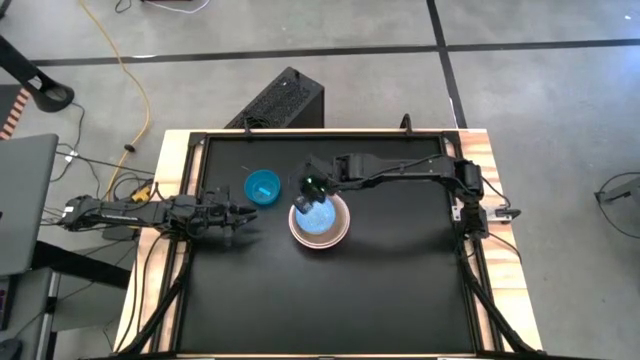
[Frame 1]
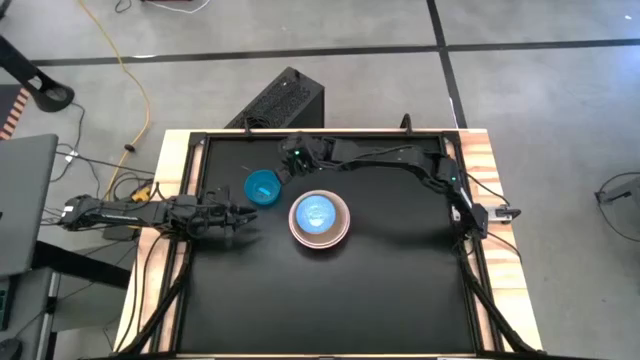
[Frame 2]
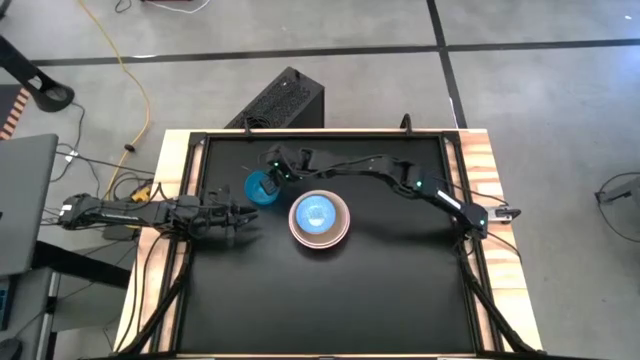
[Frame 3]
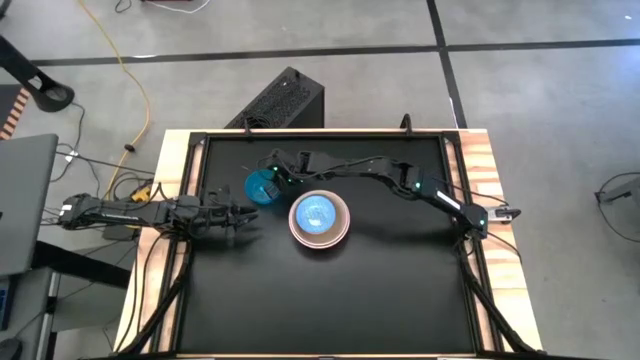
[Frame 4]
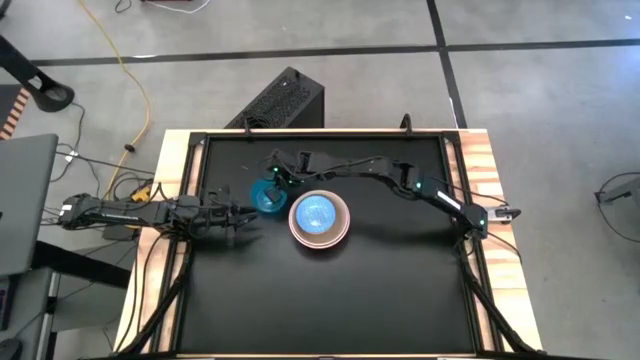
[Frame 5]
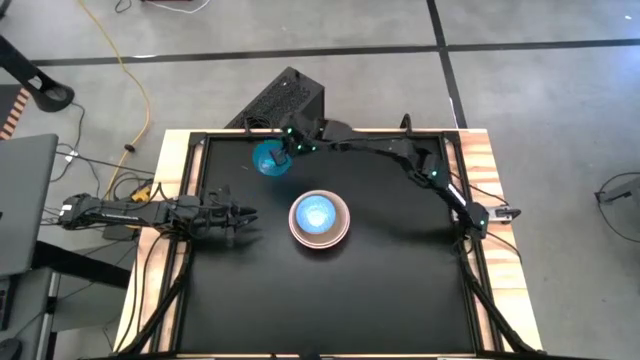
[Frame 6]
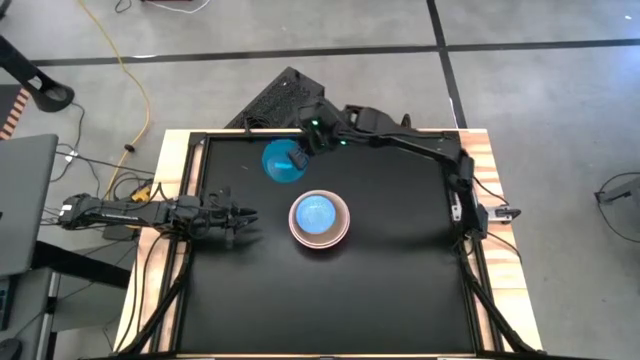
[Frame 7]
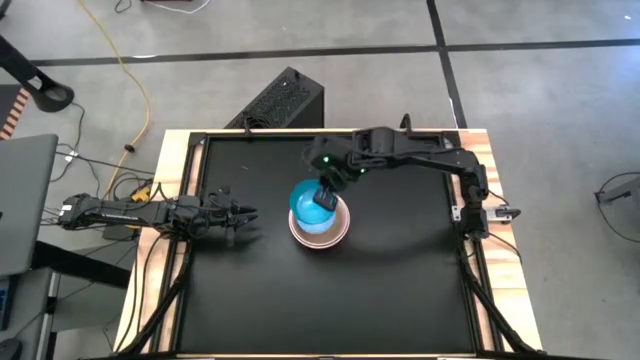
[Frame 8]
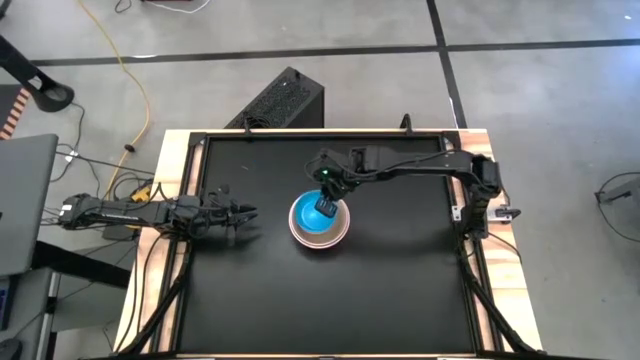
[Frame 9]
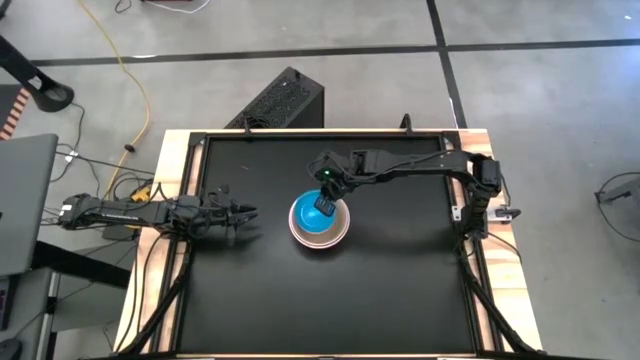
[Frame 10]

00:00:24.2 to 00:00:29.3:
Stack the blue bowl on top of the blue patterned bowl

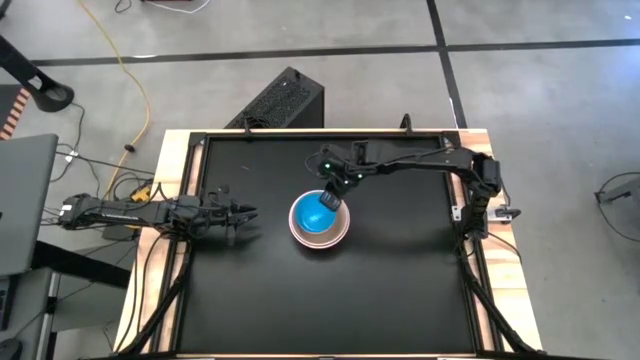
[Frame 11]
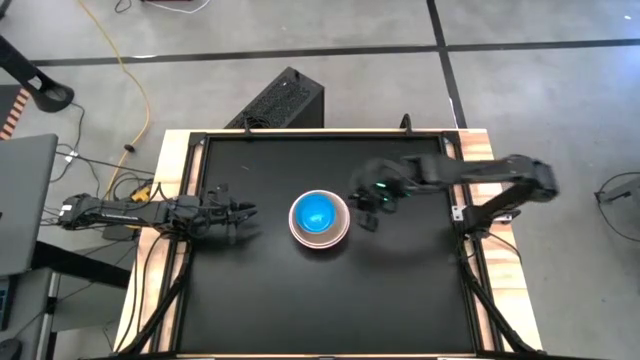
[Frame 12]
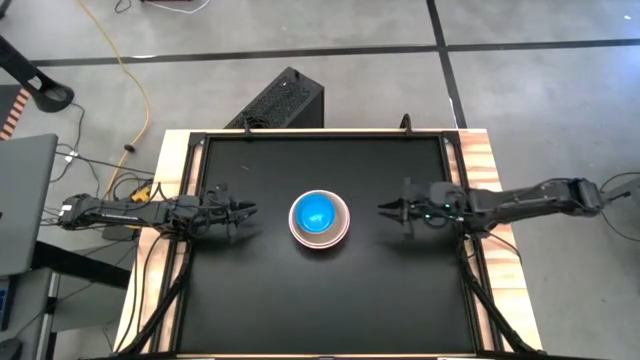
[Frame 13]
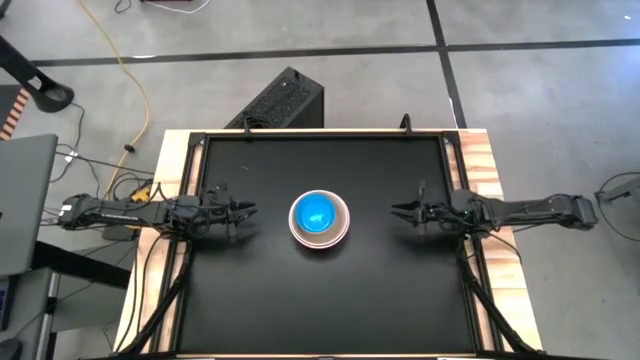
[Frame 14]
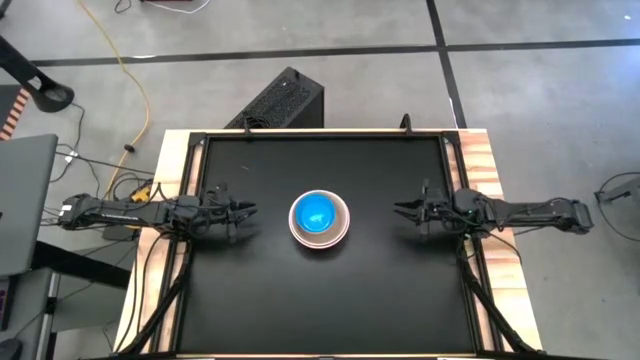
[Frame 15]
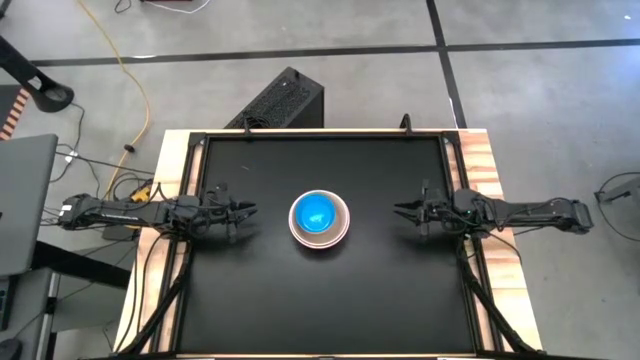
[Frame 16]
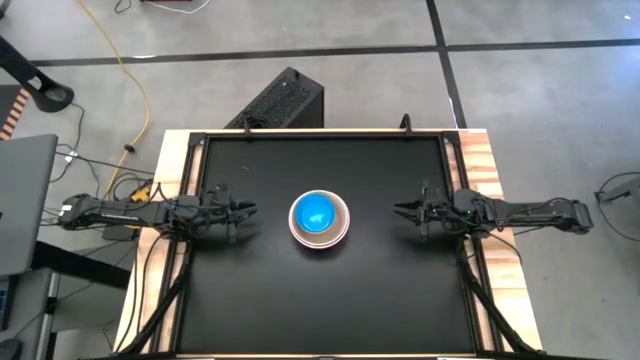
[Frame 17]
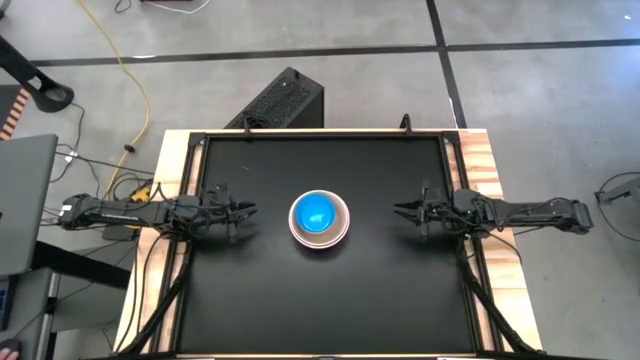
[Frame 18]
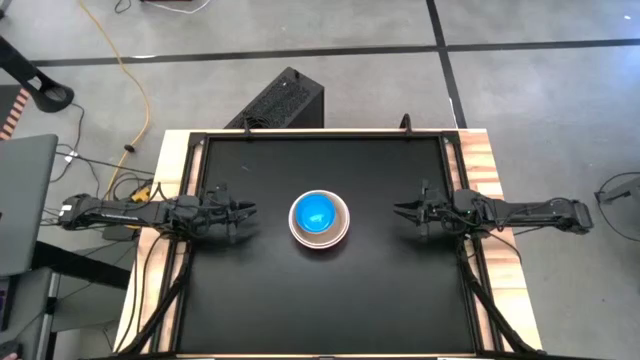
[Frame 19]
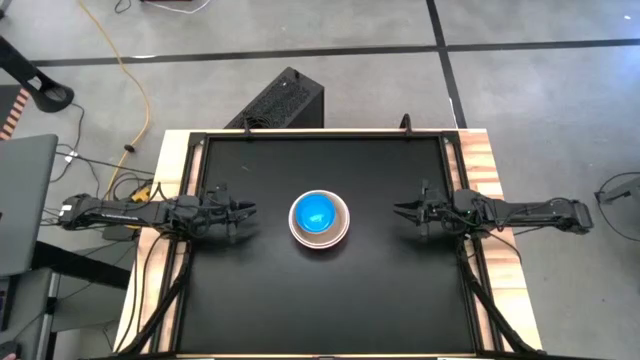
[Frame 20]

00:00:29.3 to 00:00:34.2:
Return to Home Position

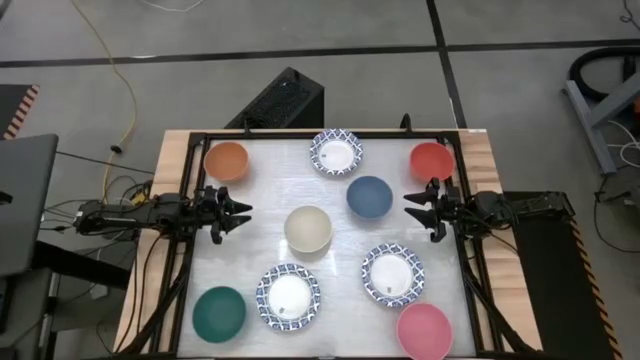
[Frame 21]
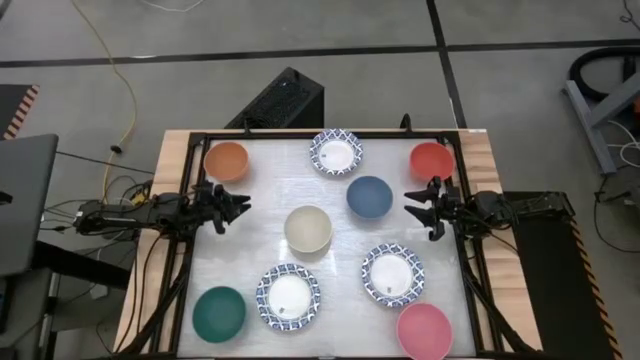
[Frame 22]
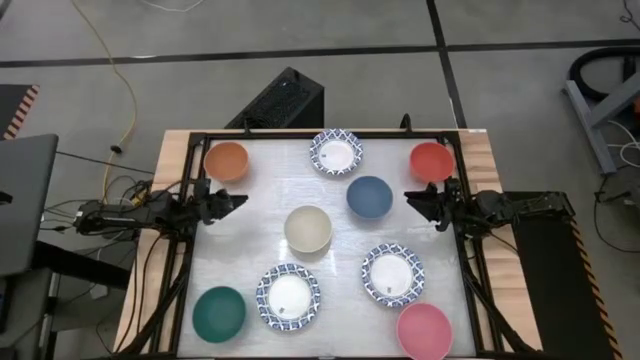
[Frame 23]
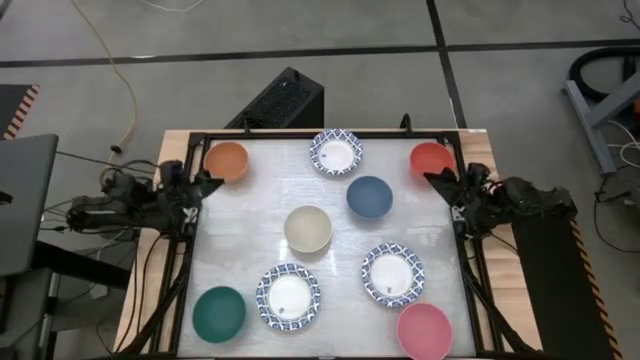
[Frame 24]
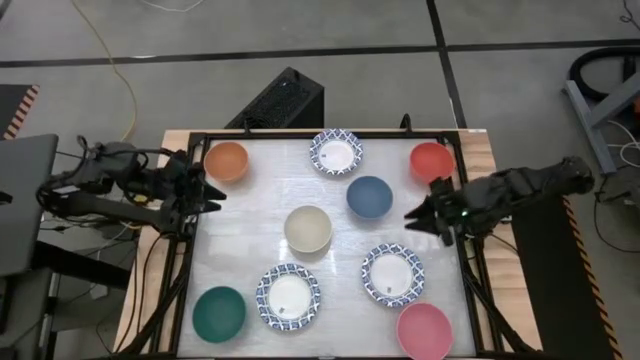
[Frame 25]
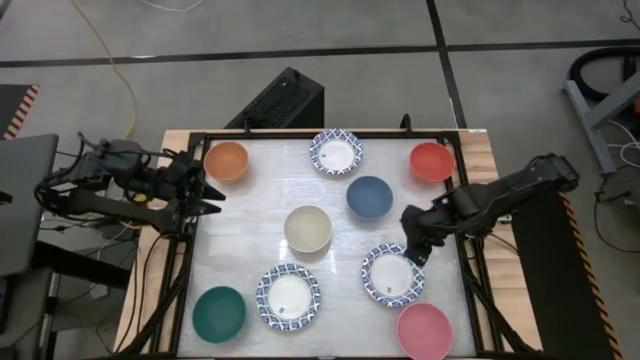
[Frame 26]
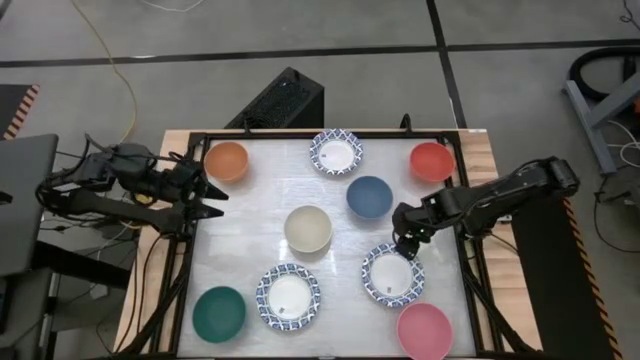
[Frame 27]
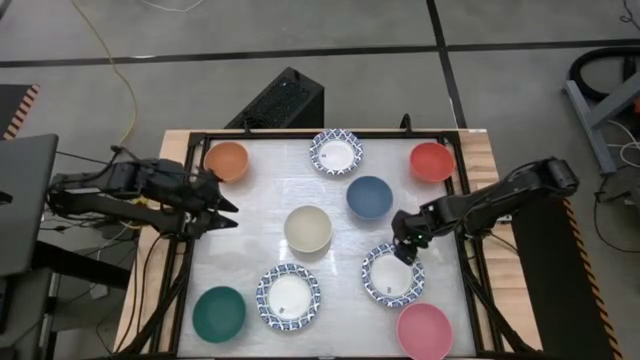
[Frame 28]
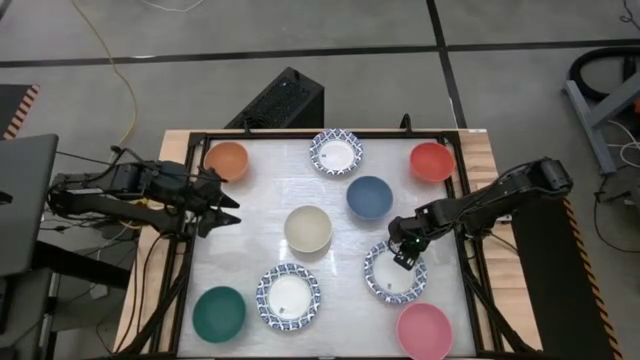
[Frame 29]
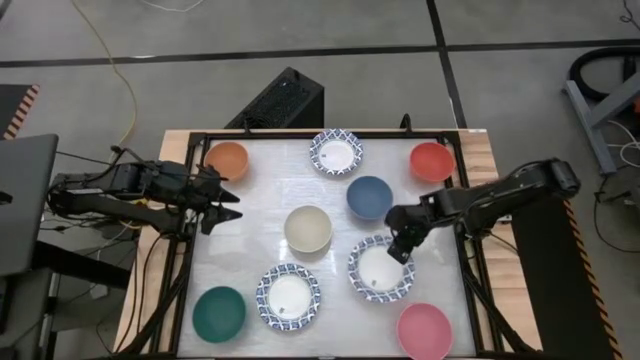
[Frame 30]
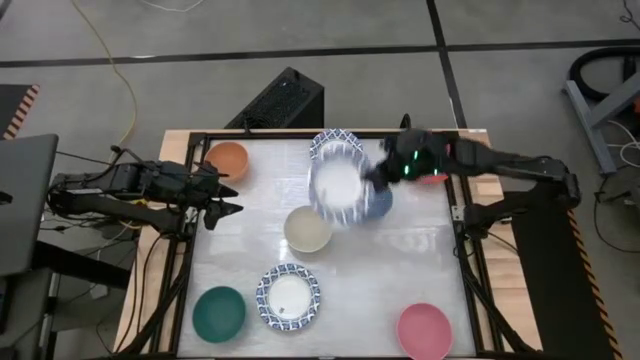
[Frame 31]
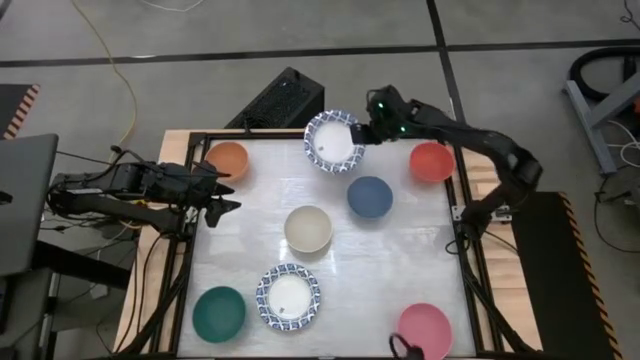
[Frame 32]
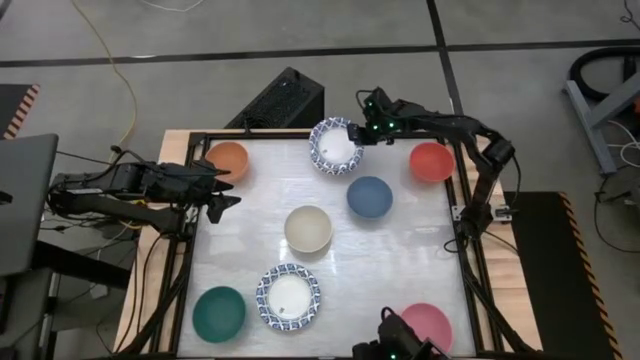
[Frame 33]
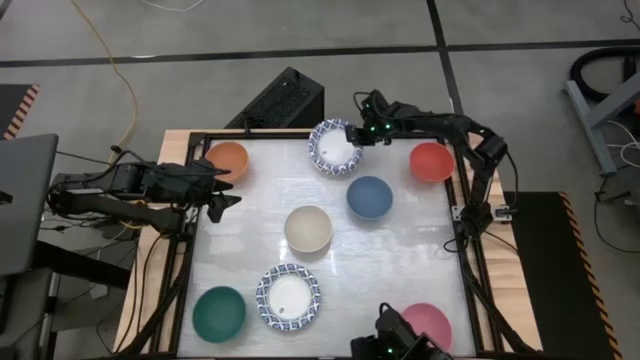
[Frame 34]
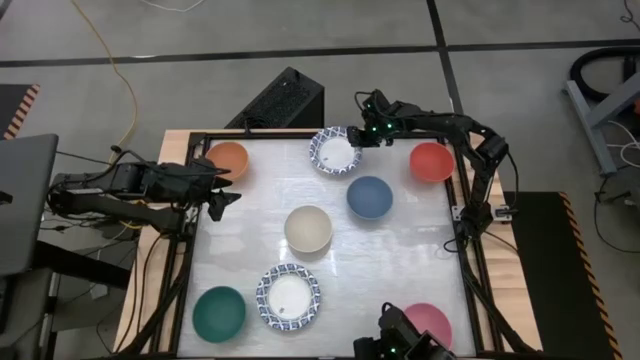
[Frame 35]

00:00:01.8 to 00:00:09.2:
Stack the right white and blue bowl on the top white and blue bowl

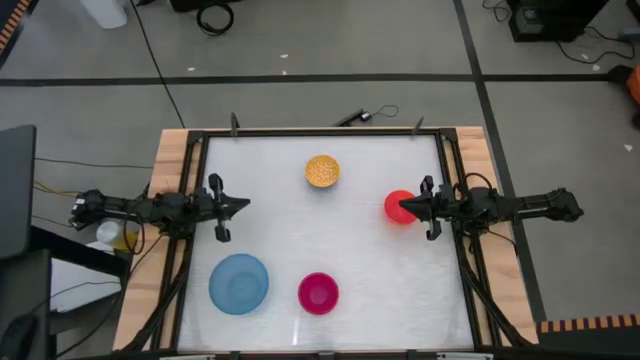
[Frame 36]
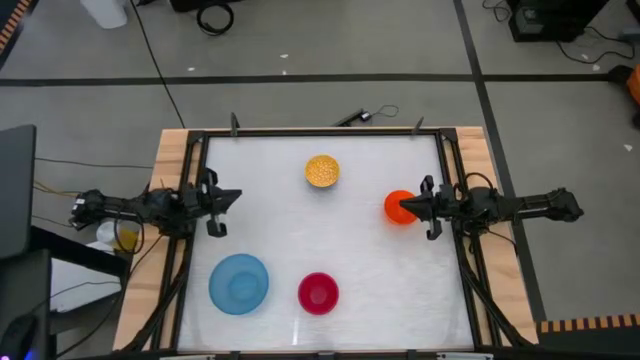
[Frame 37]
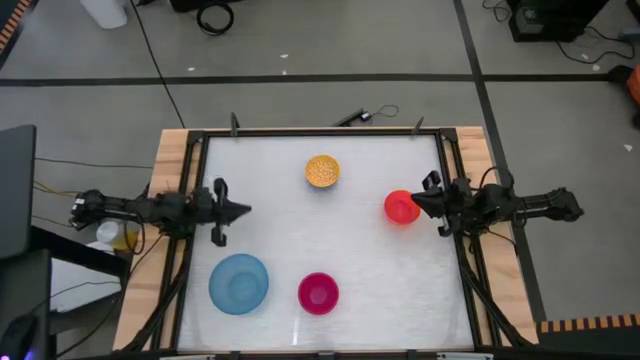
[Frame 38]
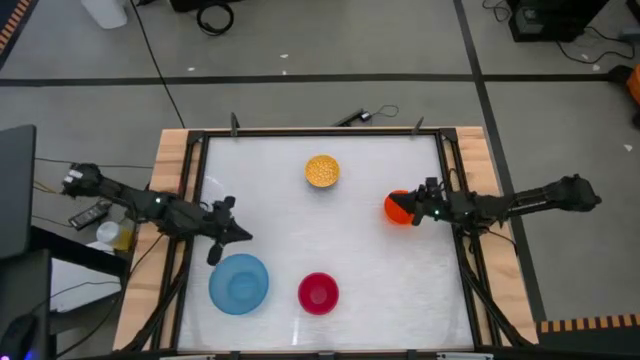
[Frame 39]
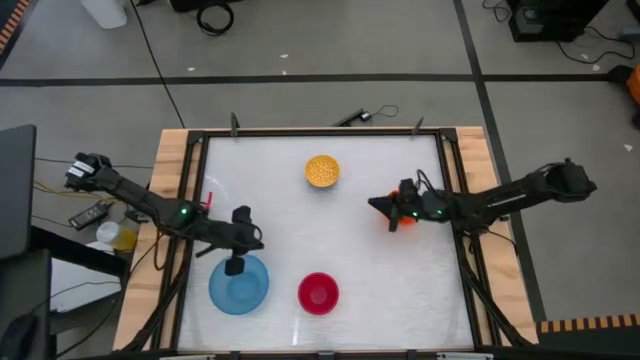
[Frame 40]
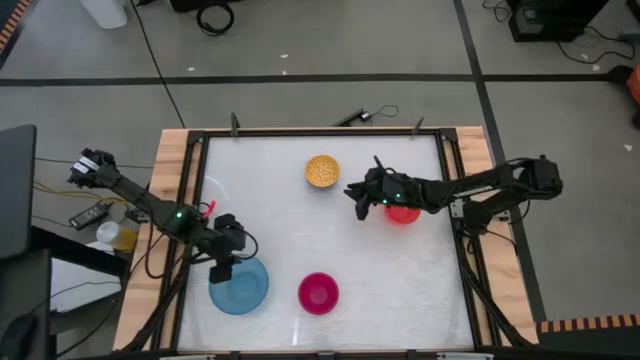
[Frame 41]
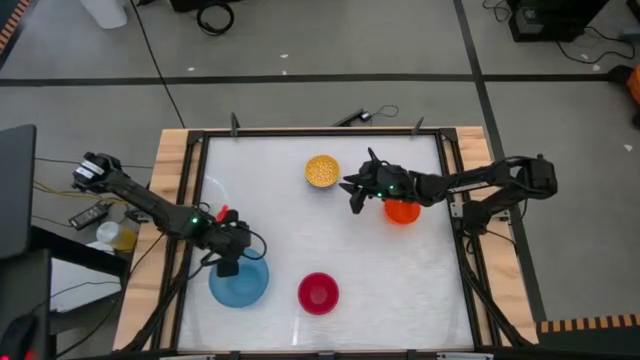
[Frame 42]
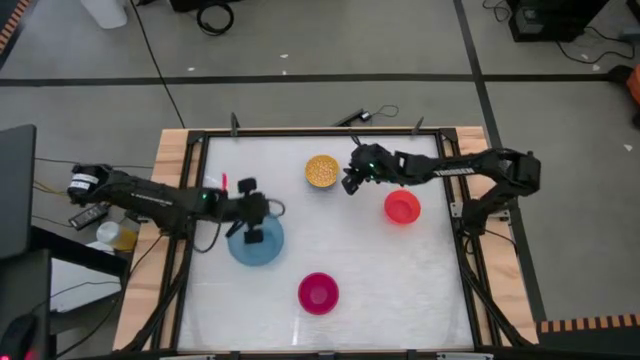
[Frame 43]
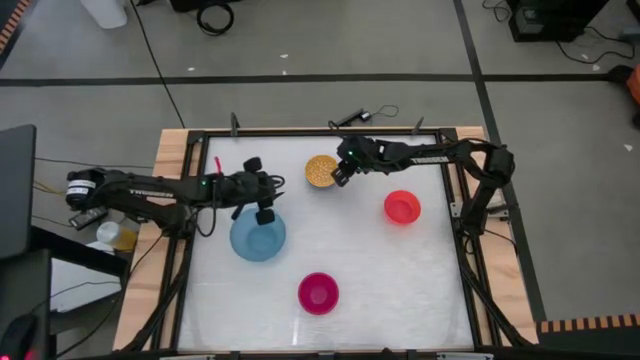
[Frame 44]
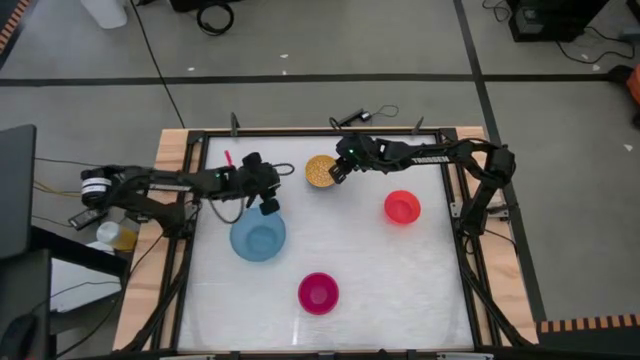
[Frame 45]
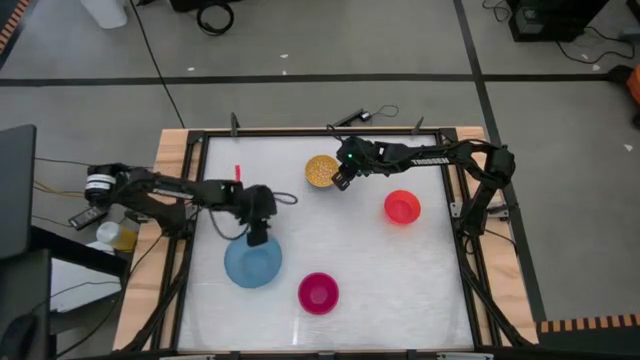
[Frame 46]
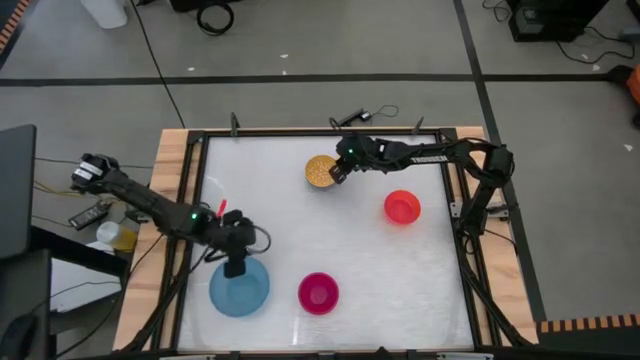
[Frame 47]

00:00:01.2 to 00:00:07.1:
Adjust the blue bowl
